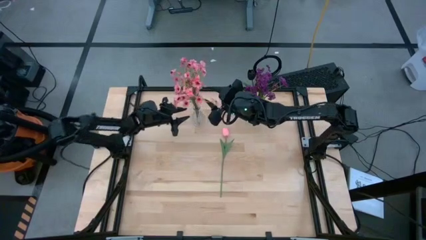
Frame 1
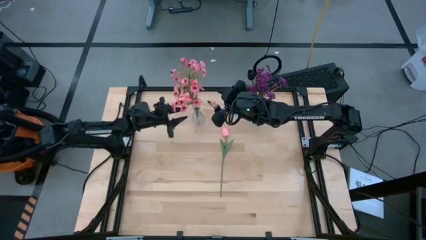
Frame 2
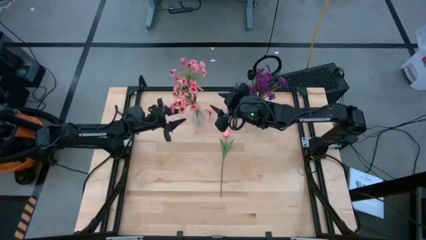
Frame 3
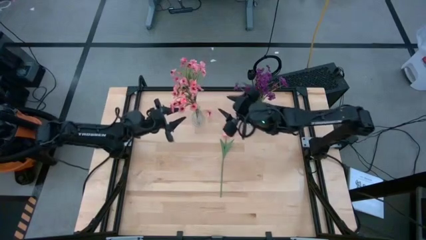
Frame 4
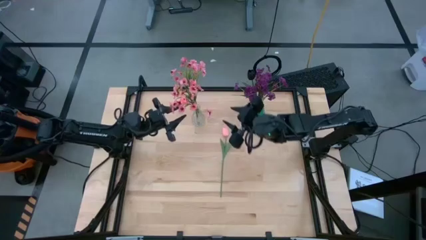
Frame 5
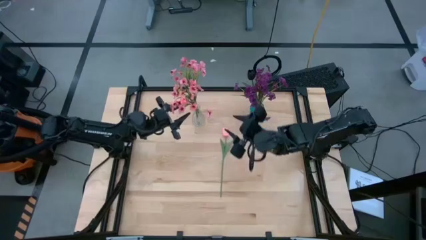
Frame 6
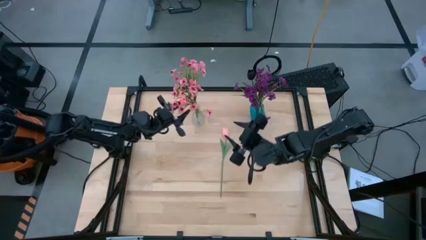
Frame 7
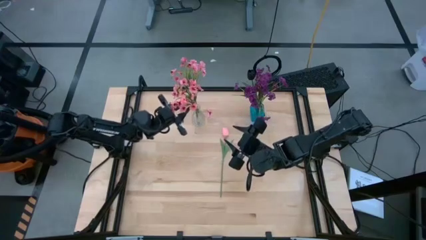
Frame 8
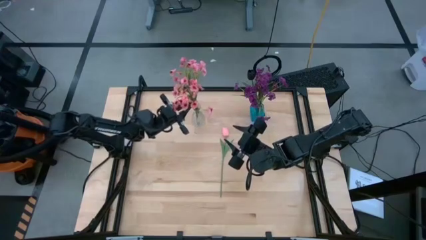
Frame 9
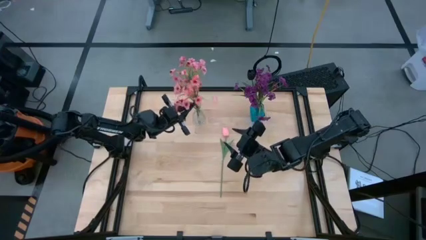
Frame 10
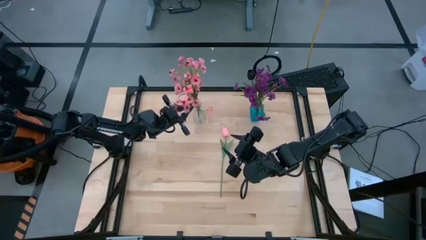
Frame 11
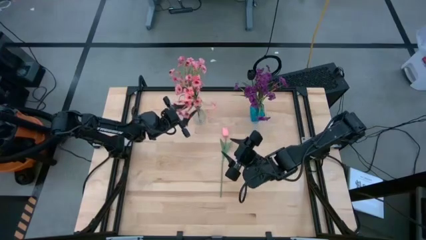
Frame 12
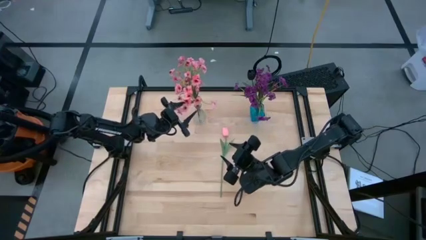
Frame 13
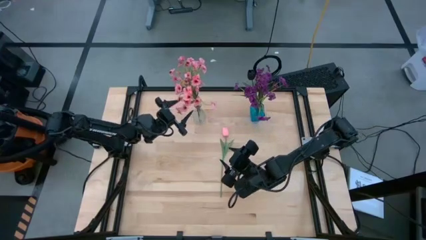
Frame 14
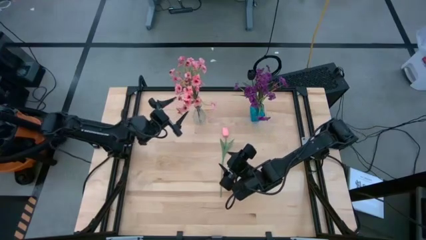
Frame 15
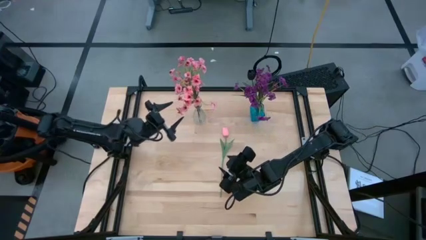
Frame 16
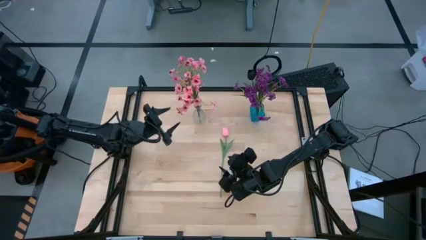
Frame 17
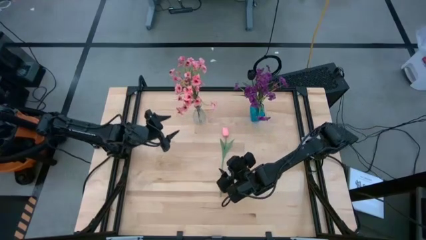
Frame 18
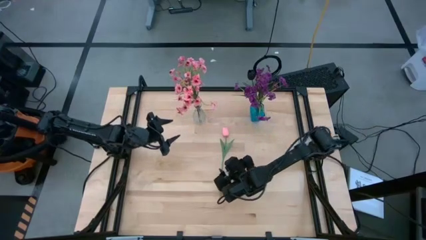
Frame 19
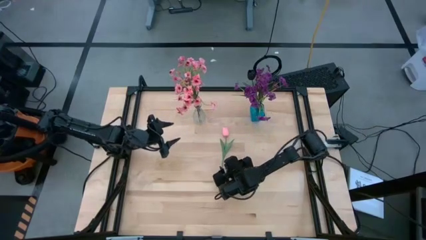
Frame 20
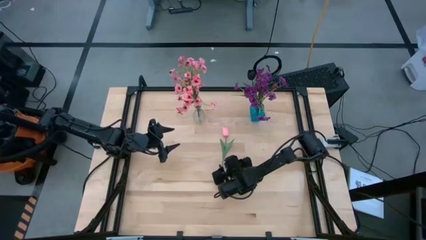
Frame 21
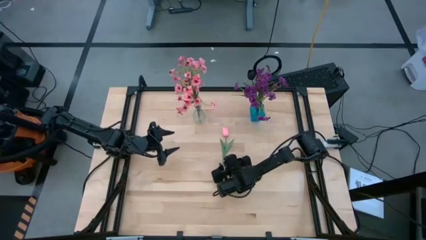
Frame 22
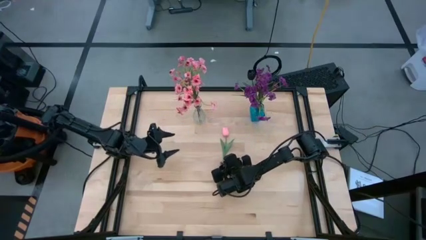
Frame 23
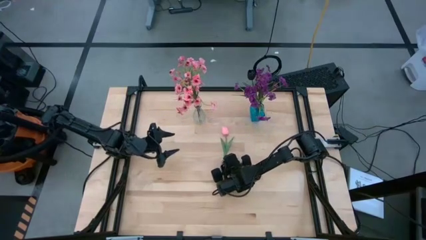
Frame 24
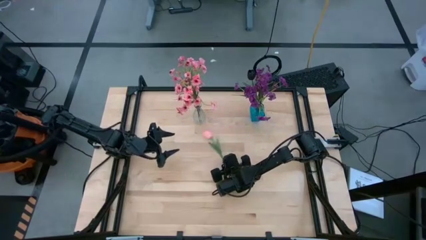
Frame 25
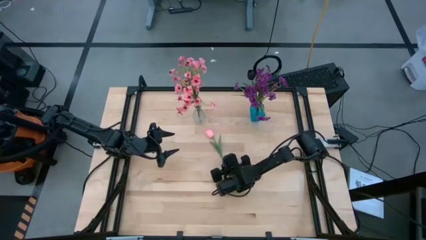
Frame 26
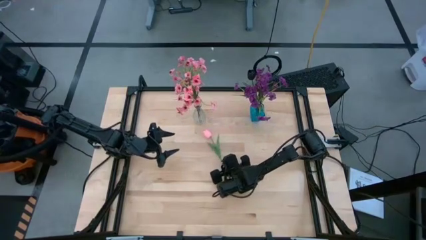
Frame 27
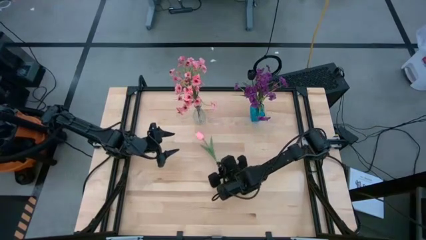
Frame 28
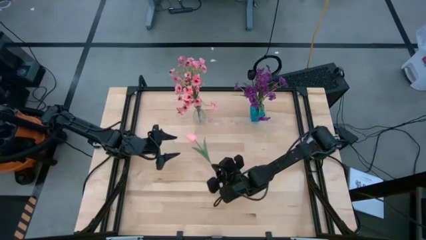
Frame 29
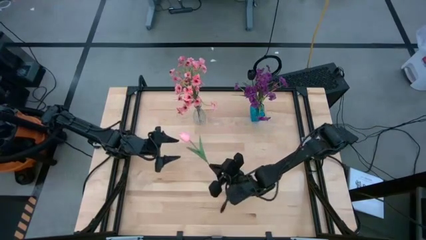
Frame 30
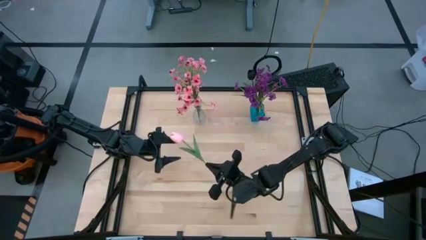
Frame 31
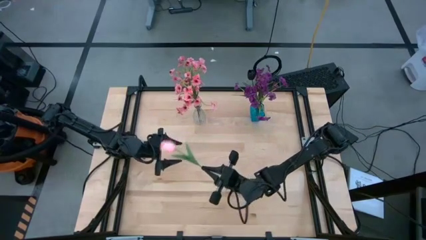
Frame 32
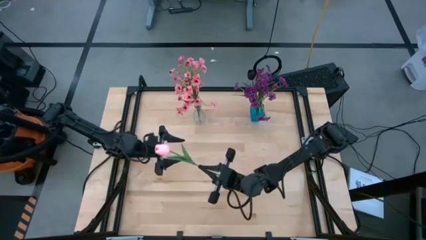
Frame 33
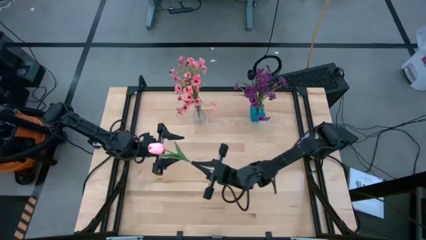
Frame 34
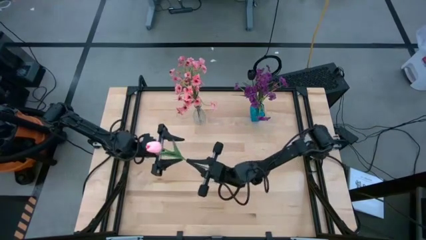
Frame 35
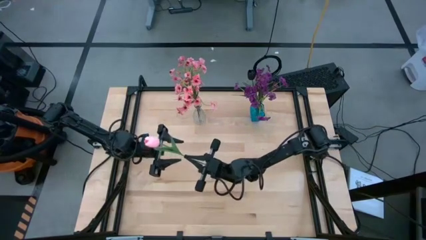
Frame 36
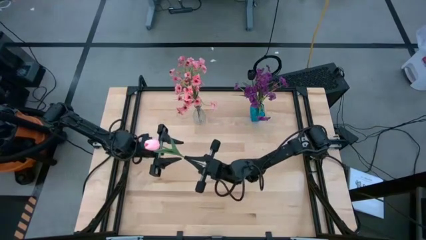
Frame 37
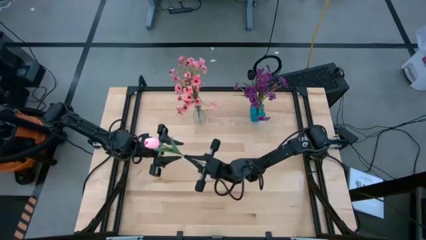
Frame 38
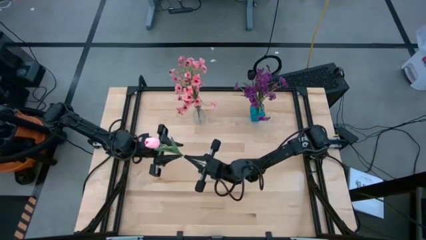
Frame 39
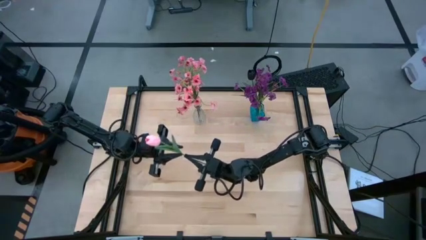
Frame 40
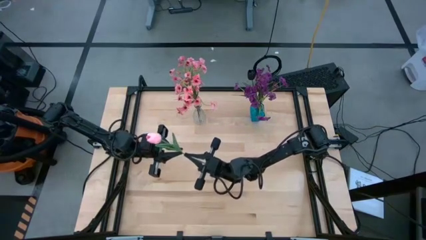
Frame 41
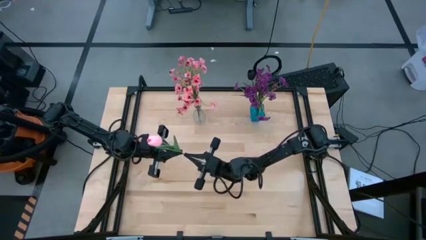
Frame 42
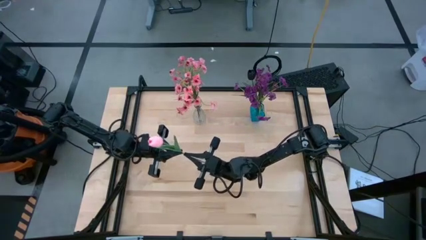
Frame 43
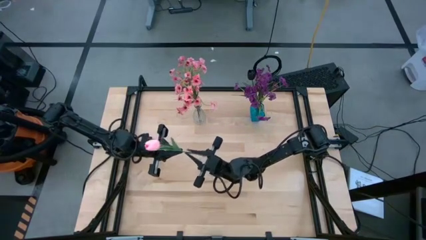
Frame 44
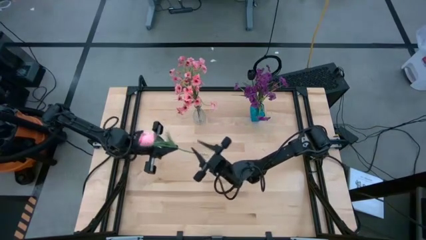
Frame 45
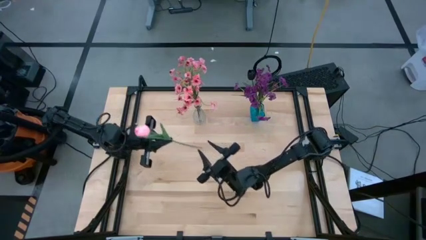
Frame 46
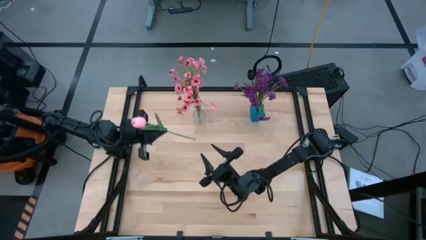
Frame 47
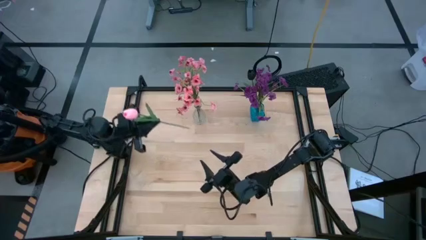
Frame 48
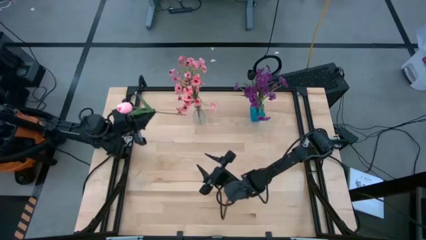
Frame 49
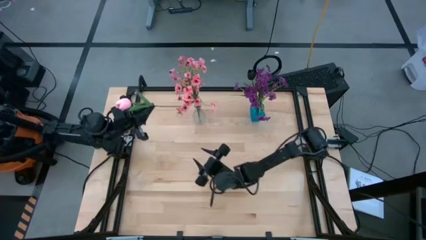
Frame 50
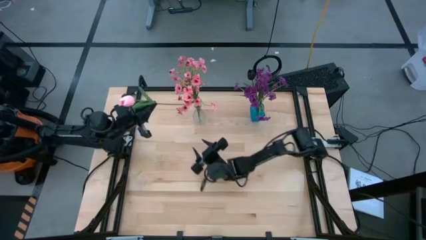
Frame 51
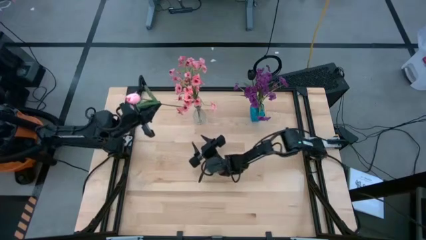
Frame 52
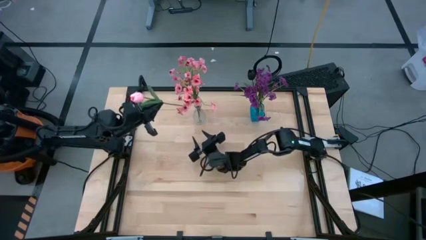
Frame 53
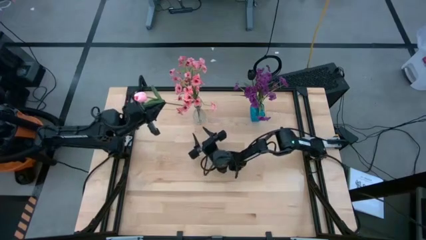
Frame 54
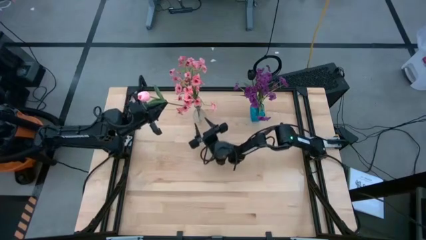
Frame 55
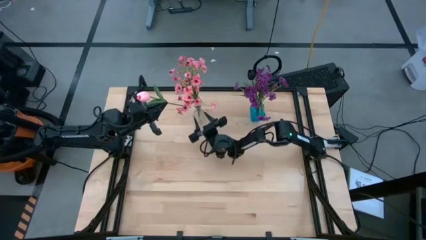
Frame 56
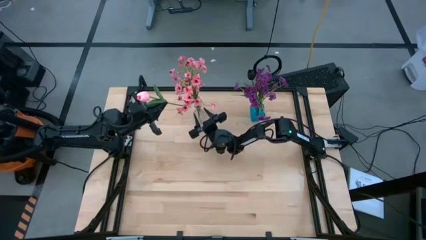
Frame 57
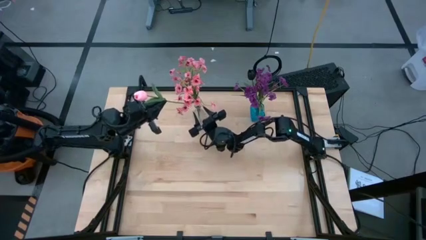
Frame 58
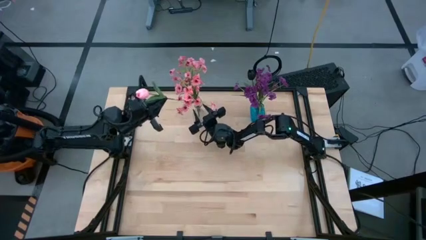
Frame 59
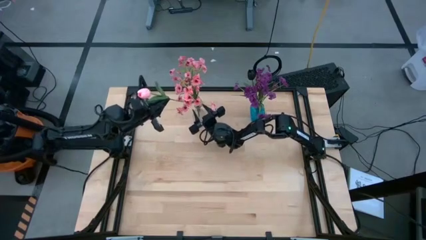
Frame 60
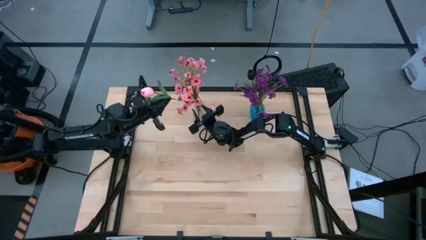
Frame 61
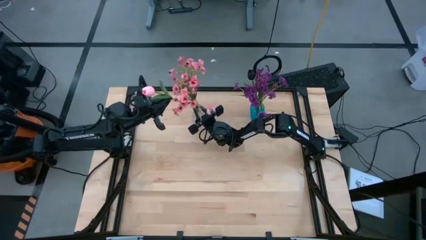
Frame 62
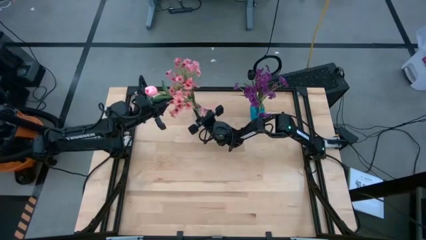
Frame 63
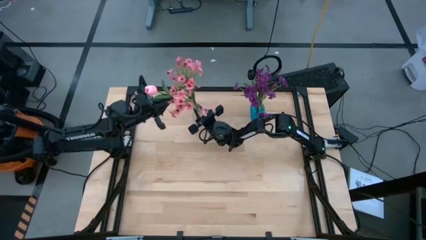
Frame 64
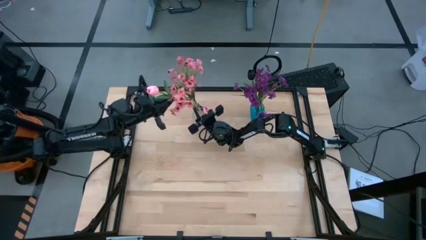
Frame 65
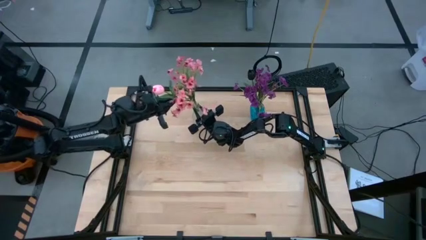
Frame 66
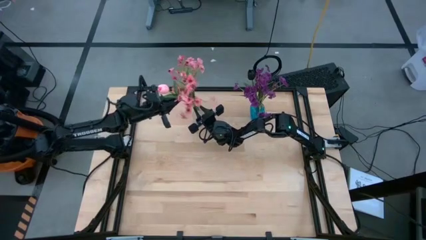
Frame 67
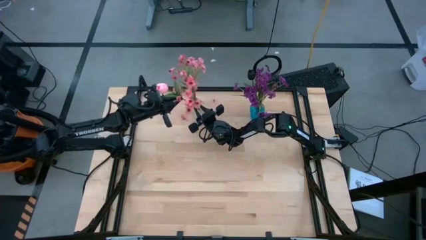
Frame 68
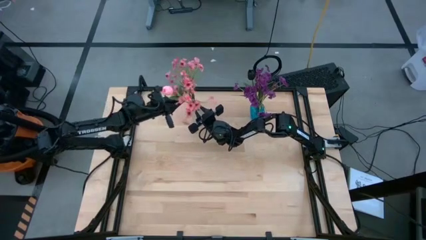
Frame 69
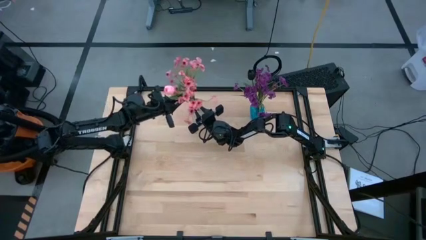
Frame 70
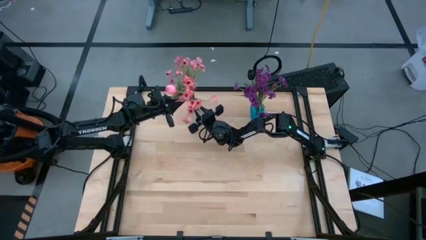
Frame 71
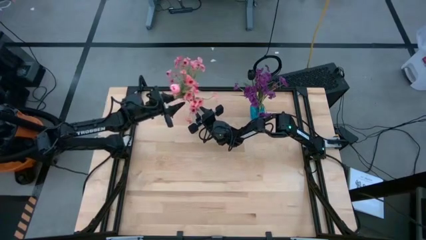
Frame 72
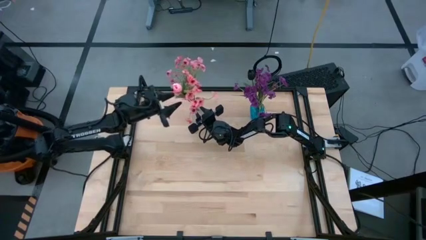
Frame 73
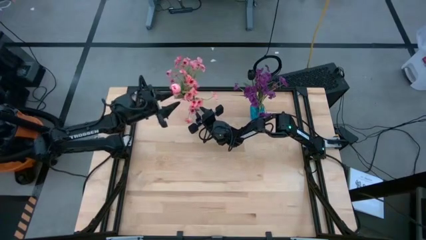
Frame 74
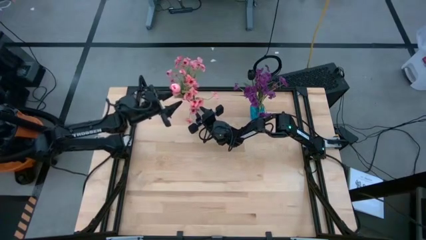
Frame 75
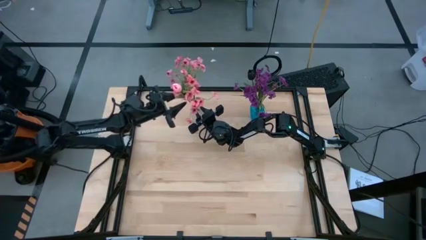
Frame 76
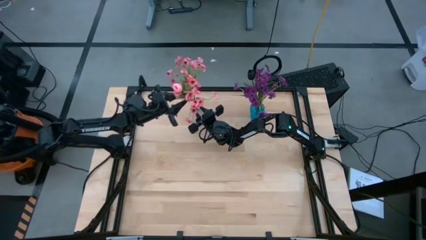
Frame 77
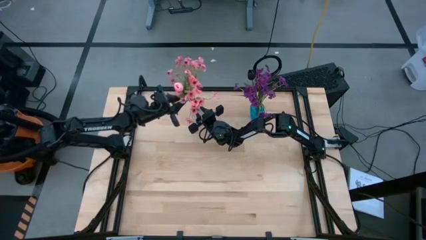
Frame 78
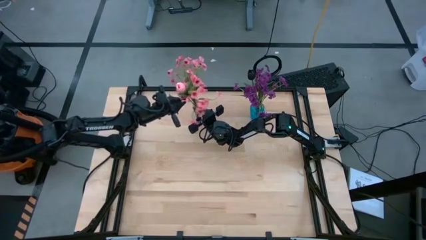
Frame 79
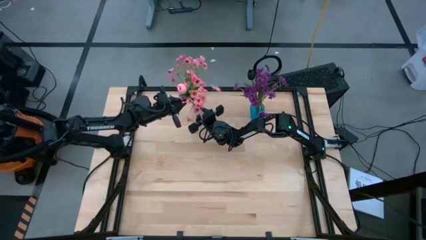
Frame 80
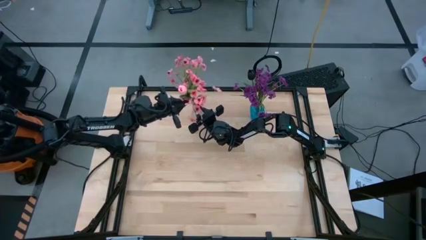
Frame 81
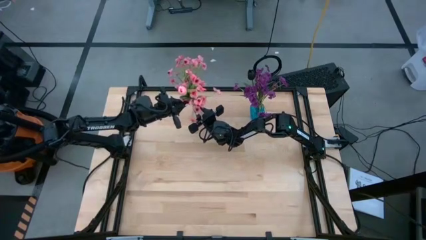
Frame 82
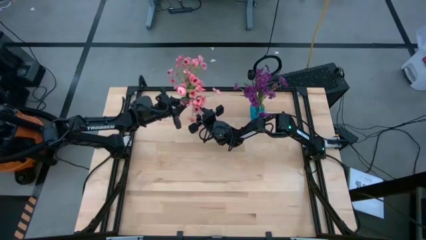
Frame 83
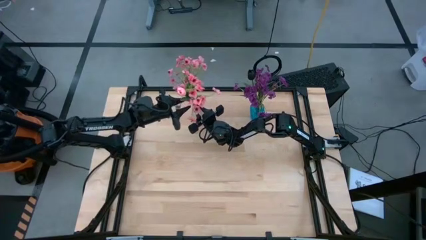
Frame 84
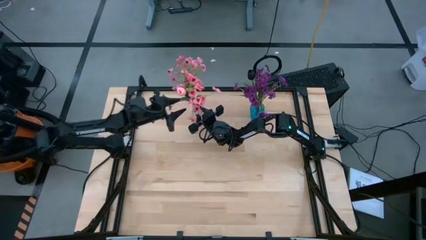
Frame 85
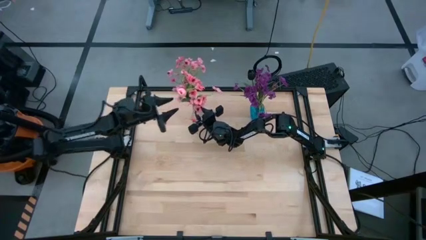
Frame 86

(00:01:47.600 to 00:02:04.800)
Task: Sort flowers into vase by color
Put the pink flower into the transparent vase
